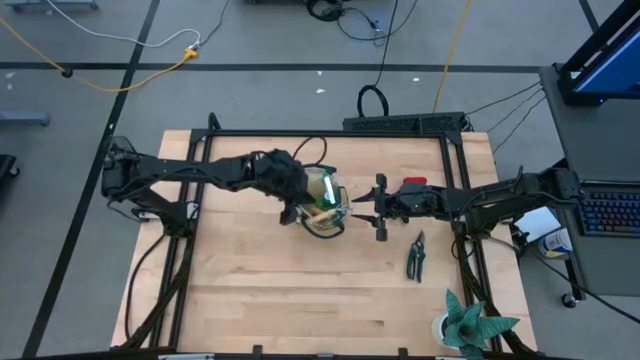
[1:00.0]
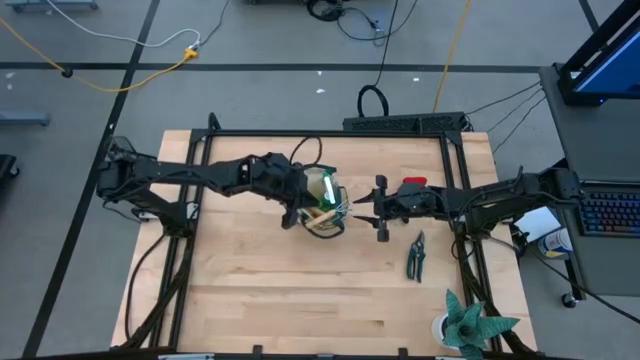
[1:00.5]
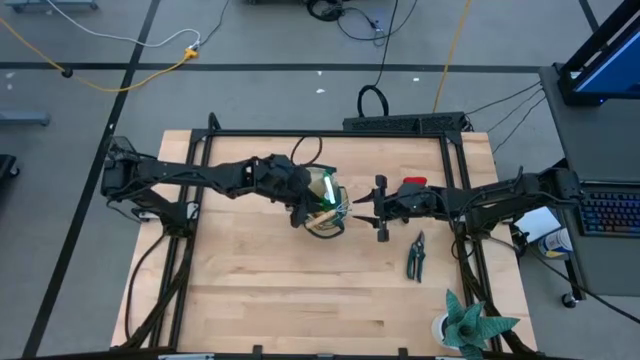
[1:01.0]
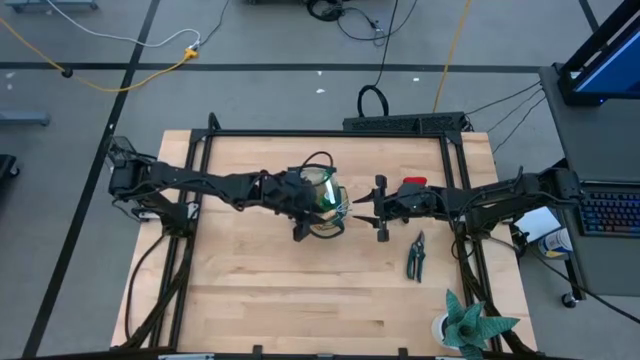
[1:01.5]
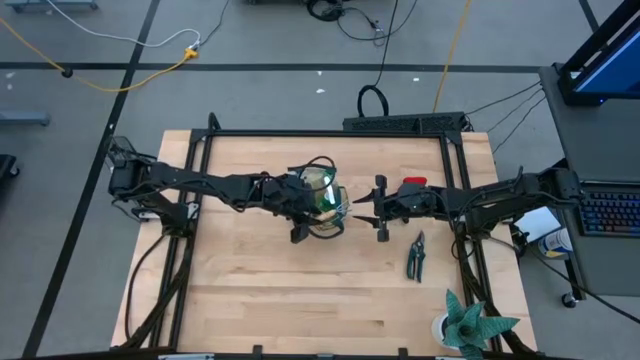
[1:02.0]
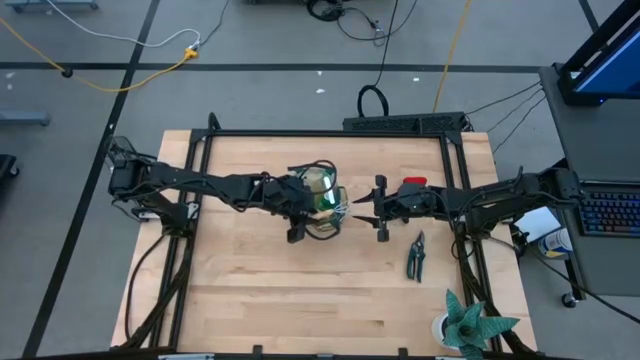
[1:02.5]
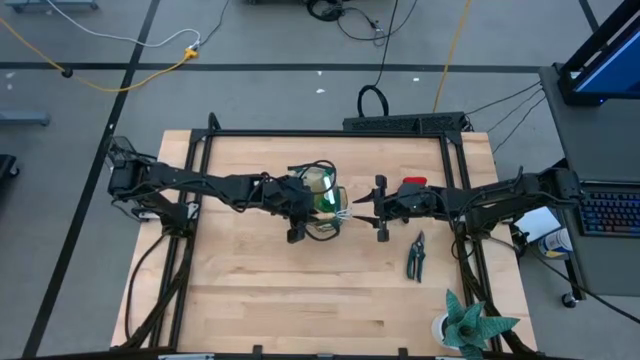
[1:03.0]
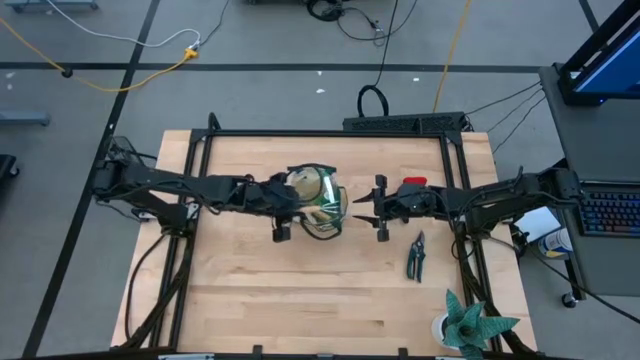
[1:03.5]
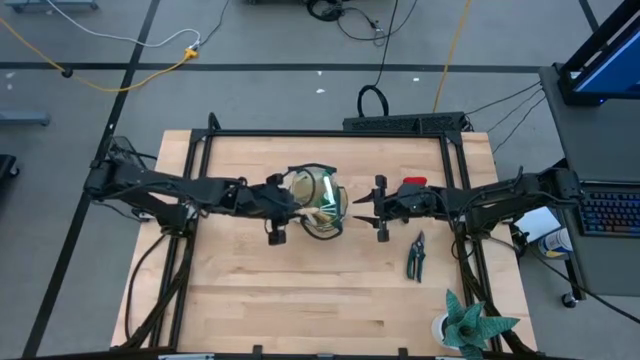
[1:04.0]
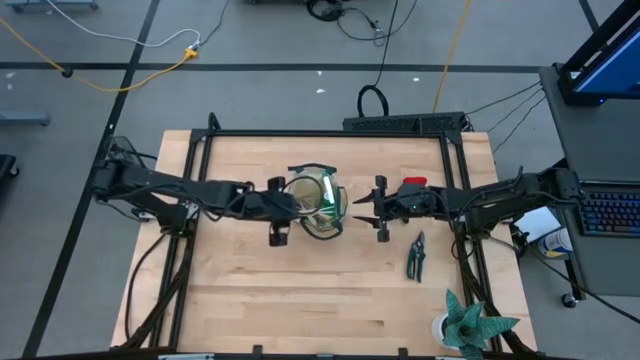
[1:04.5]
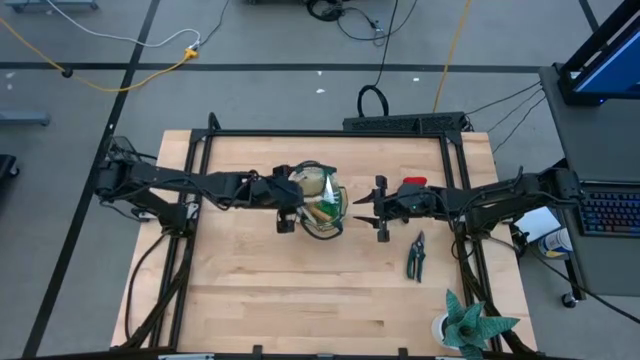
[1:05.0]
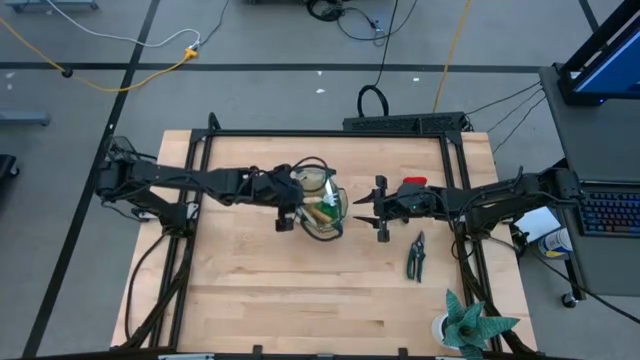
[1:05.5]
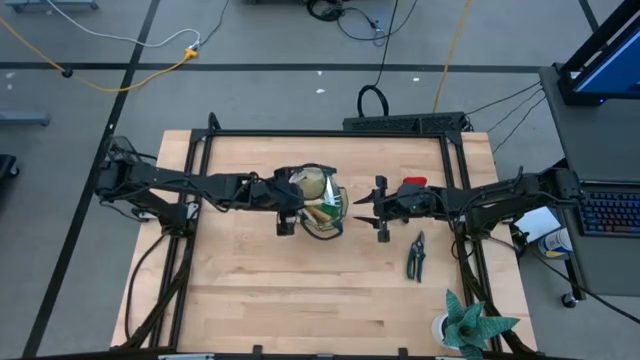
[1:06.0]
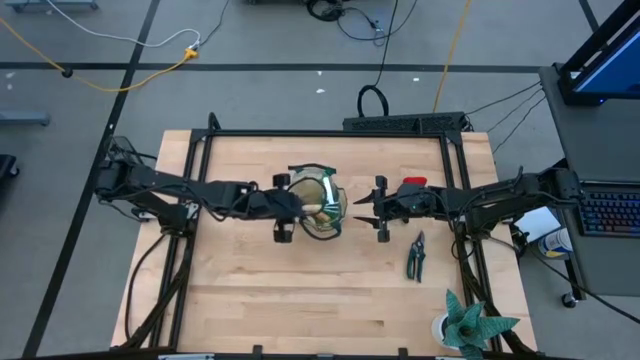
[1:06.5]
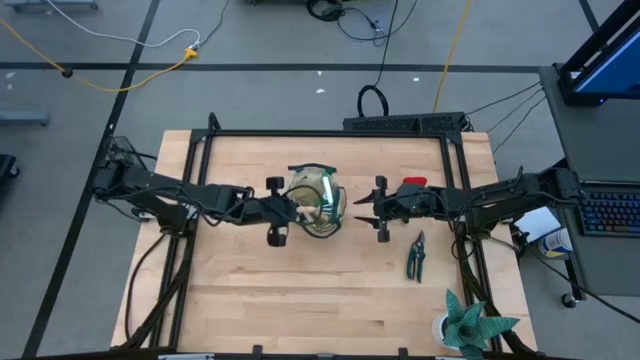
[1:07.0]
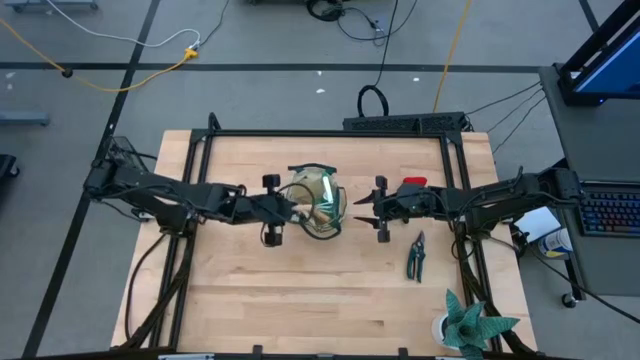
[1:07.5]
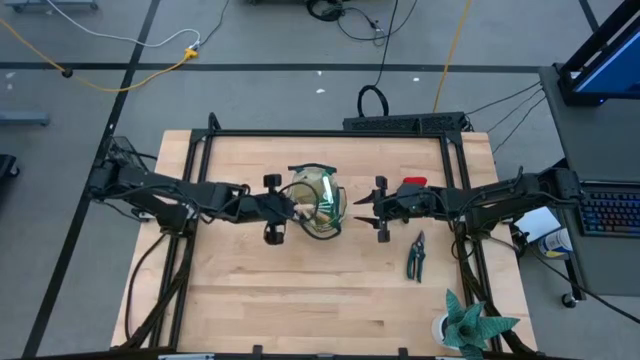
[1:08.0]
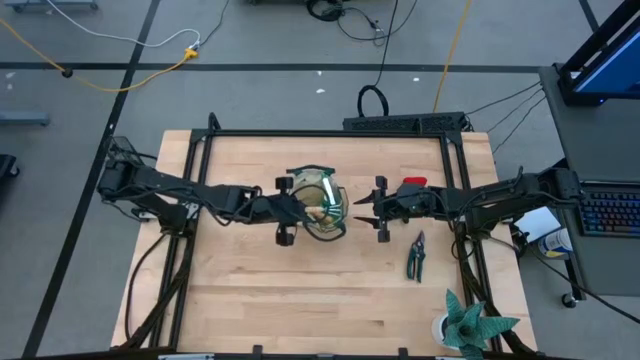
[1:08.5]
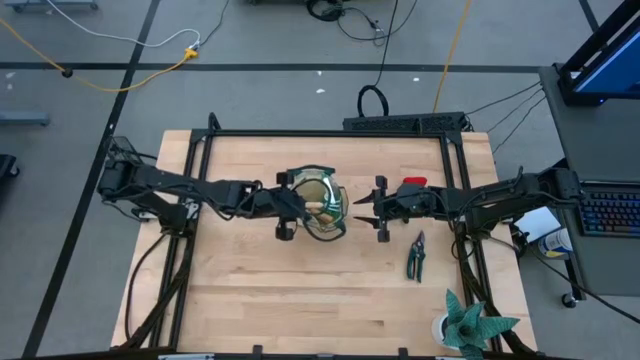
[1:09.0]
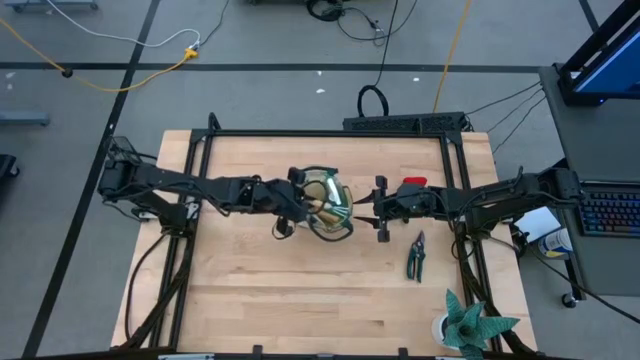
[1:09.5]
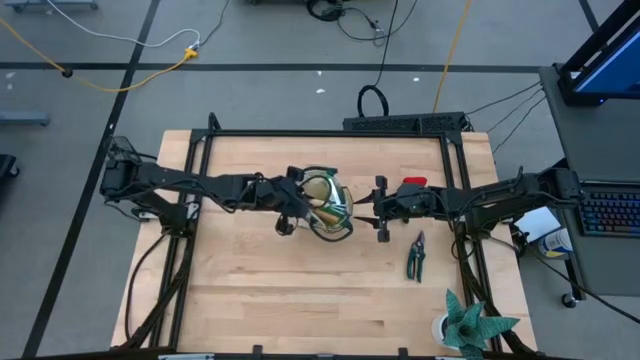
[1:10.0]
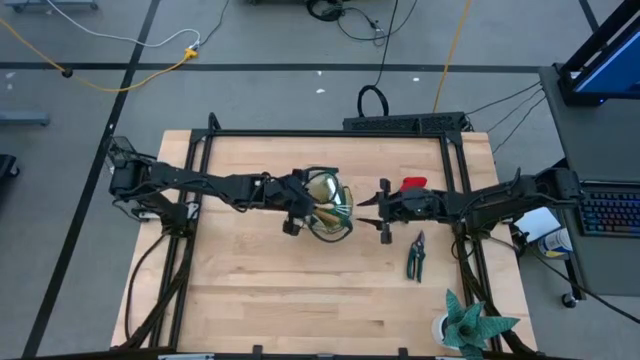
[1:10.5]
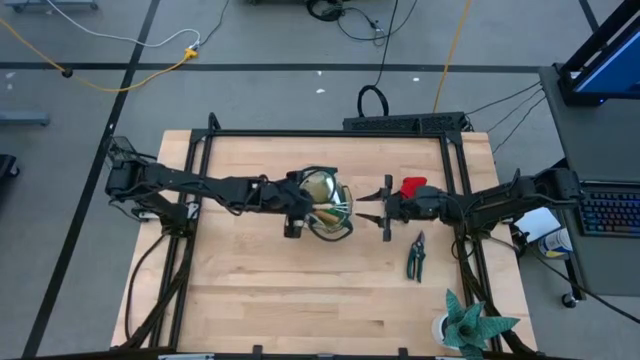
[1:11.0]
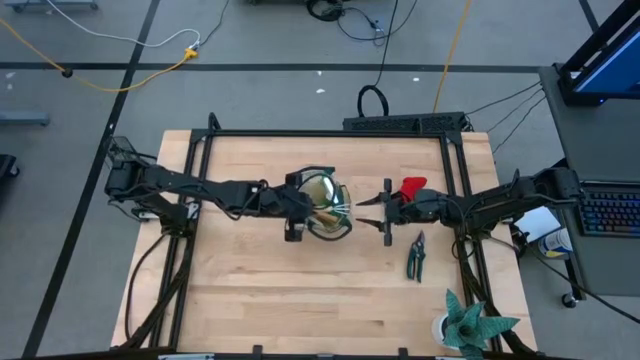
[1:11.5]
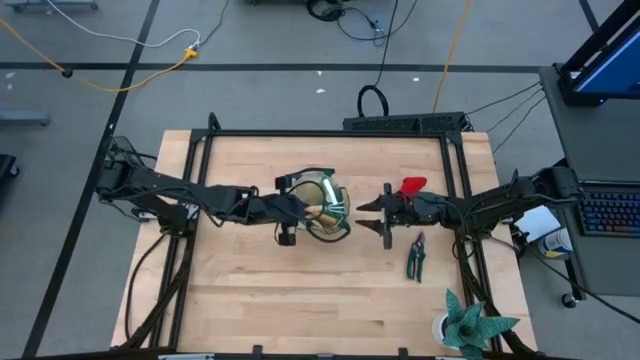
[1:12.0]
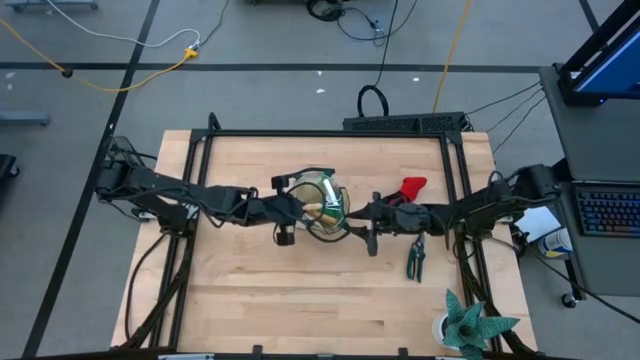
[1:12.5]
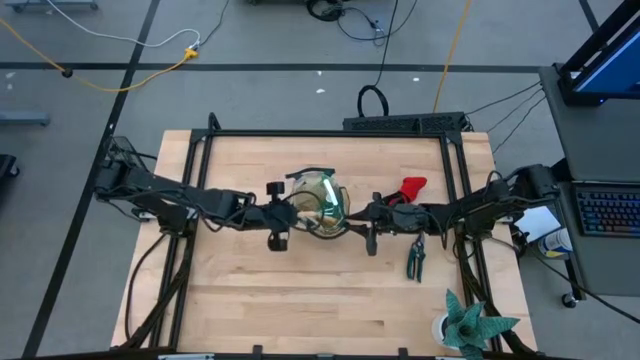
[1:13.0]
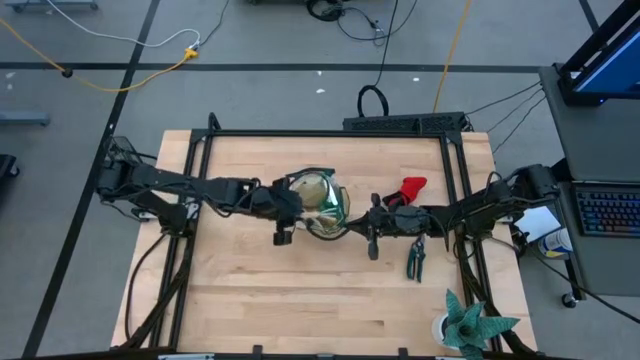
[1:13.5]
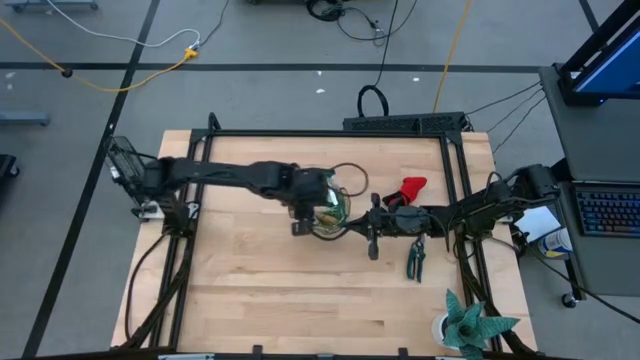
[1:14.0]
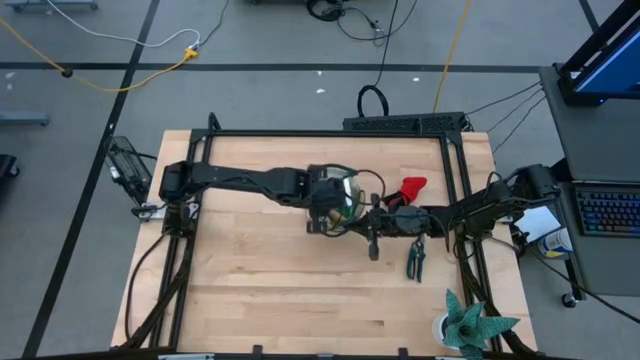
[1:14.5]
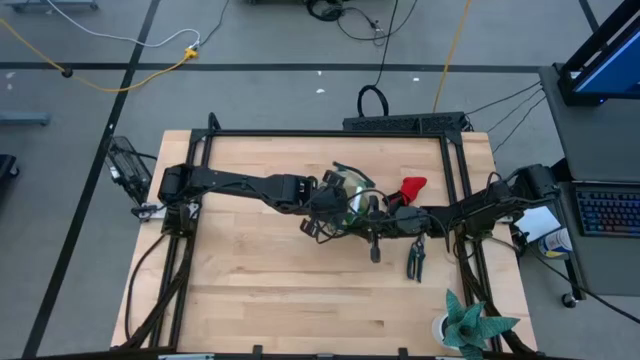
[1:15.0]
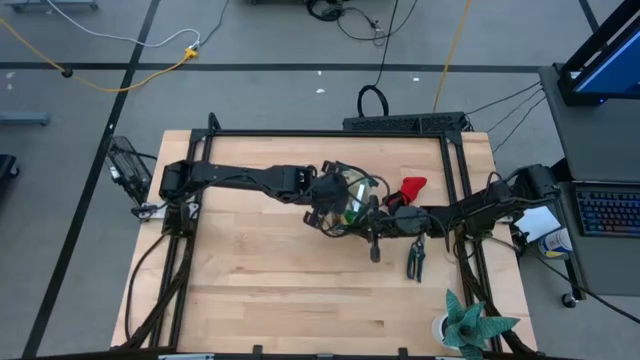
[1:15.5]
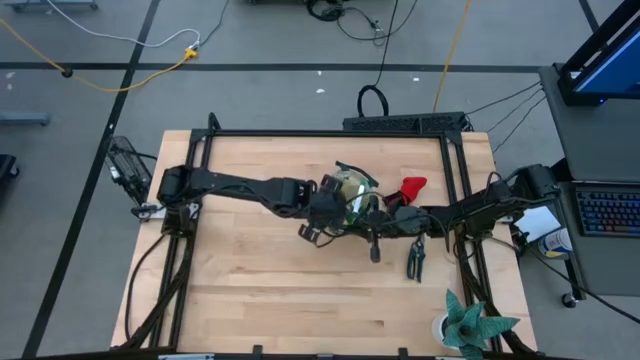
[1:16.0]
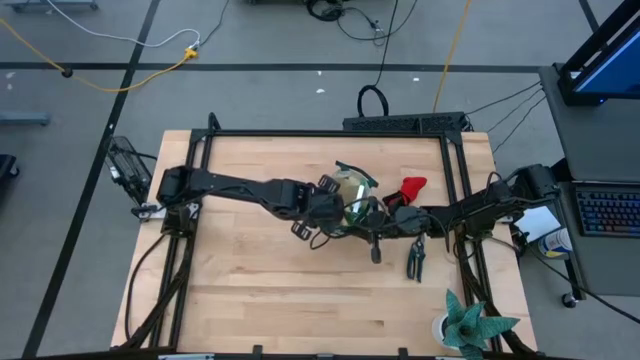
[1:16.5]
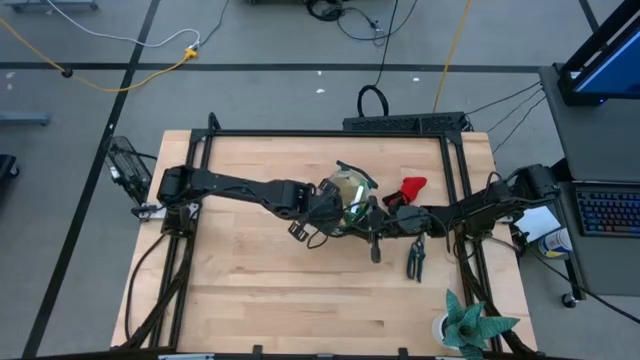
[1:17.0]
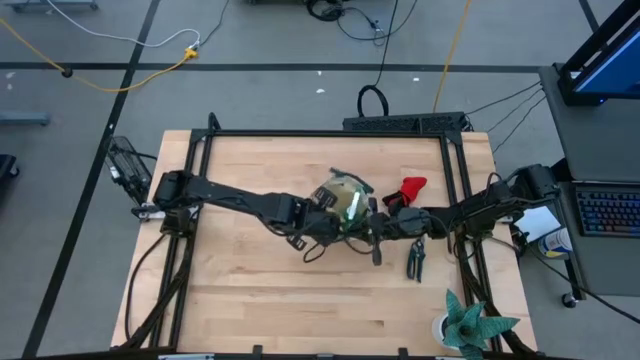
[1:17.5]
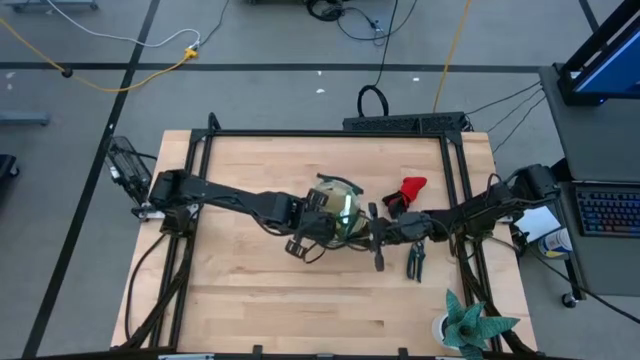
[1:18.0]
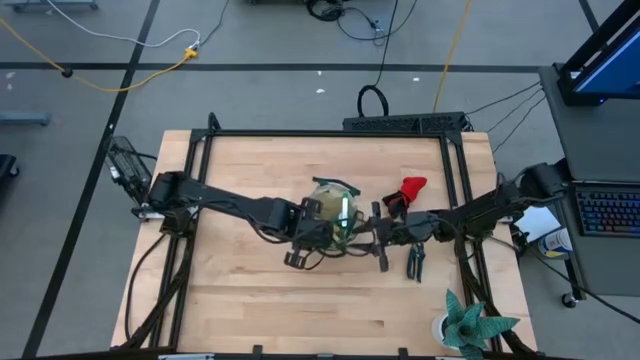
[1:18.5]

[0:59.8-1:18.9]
Task: Pick & Place Garden tools in Gardening bag
Put the brown hand rake into the brown gardening bag

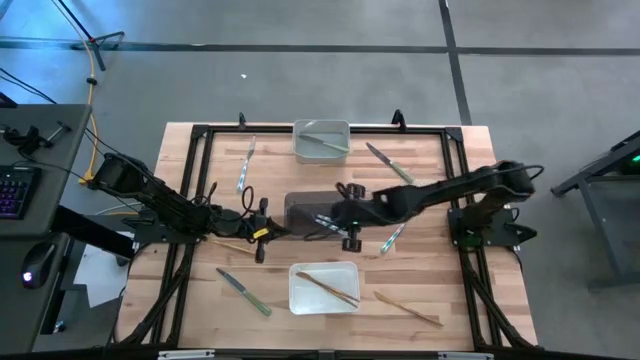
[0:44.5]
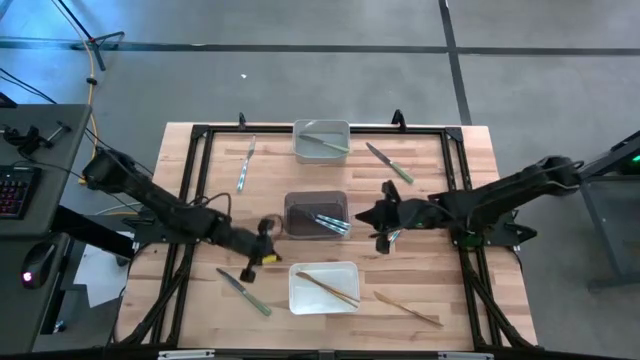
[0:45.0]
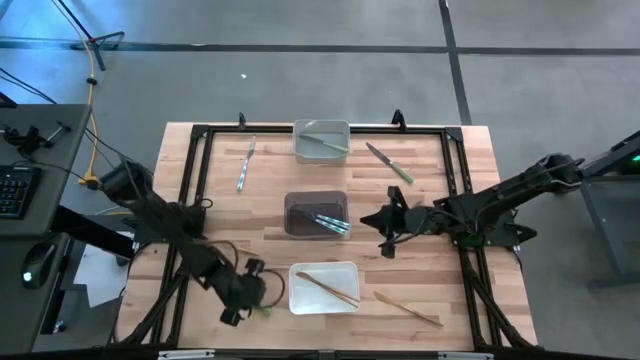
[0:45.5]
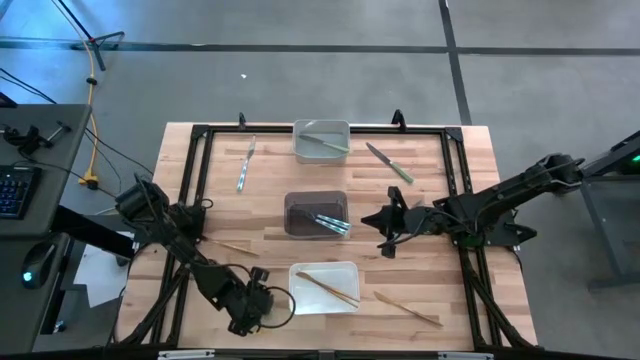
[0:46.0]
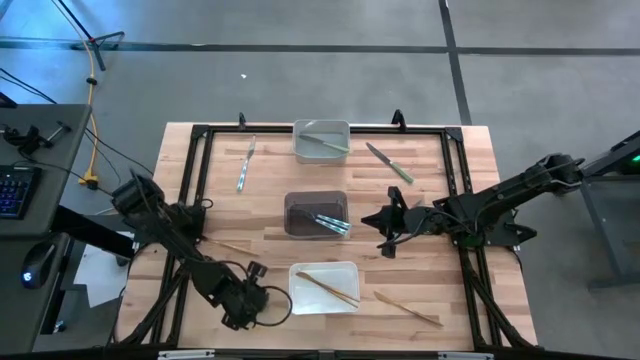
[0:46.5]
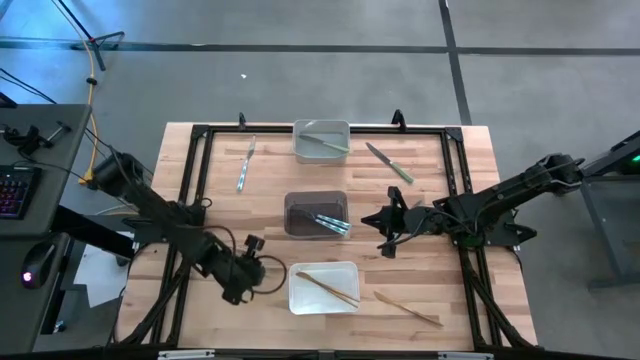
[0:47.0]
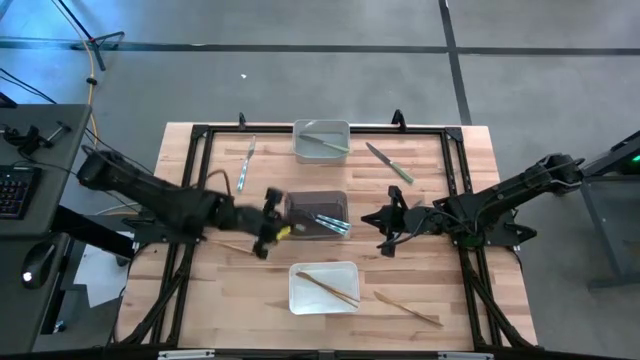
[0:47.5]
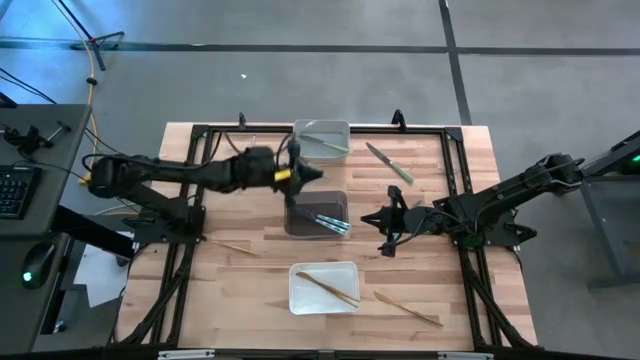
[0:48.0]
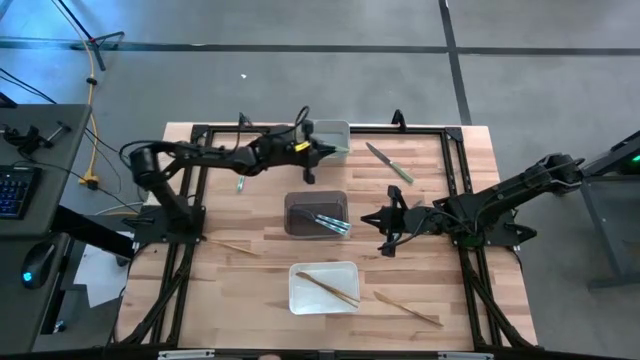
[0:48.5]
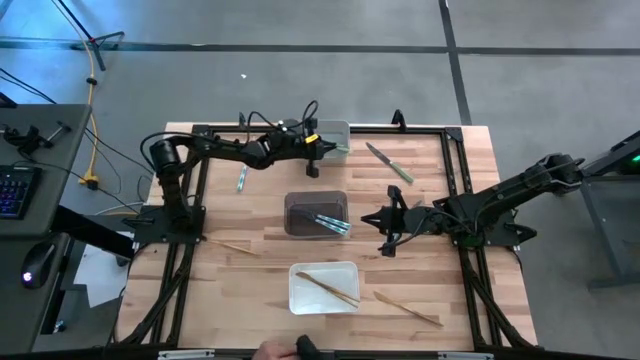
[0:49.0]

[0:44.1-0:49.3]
Task: Sort silverware by color (type)
Put the green table knife into the gray bin
